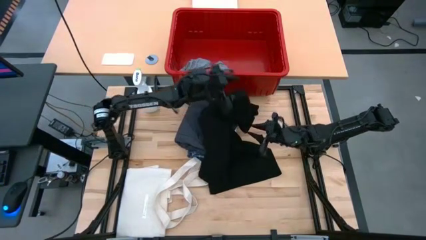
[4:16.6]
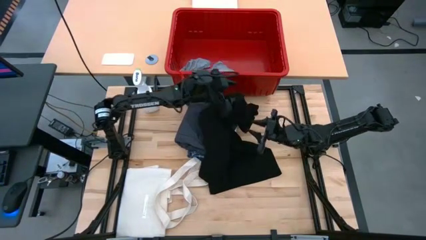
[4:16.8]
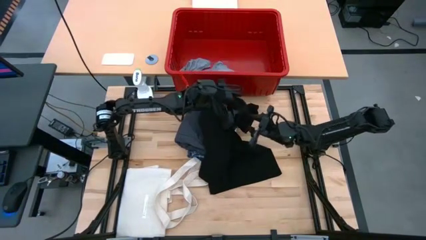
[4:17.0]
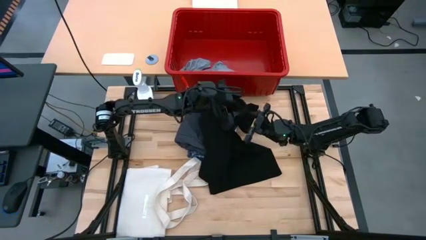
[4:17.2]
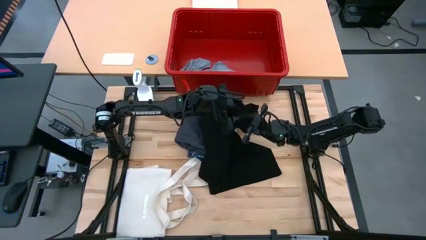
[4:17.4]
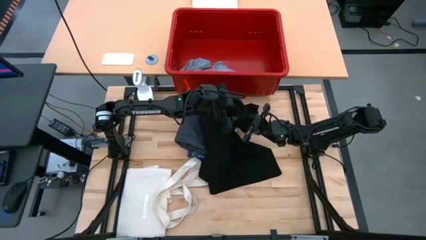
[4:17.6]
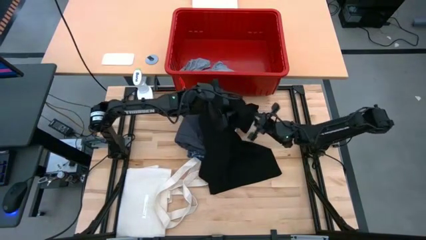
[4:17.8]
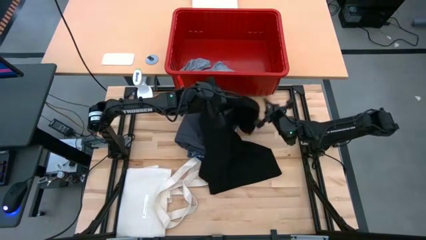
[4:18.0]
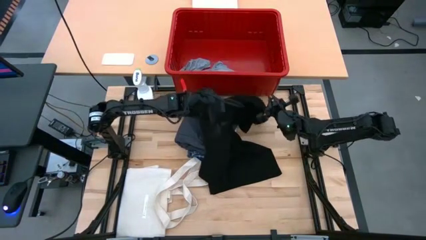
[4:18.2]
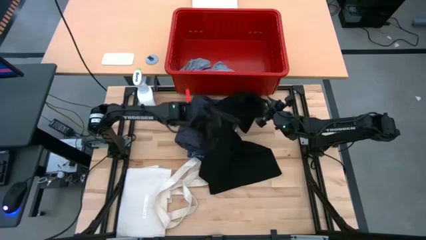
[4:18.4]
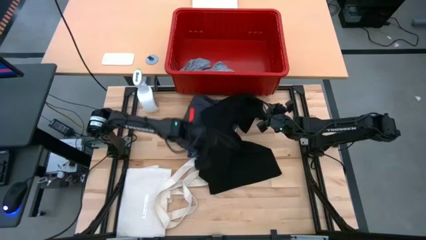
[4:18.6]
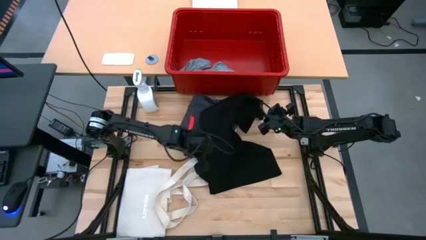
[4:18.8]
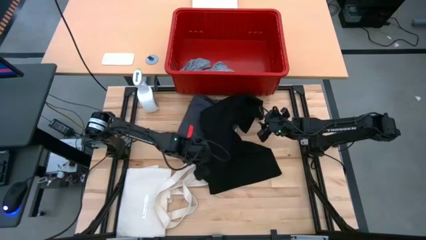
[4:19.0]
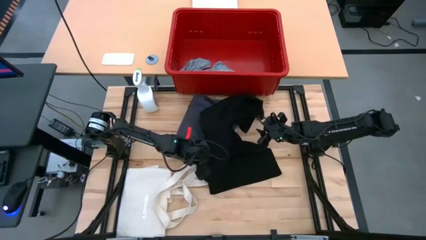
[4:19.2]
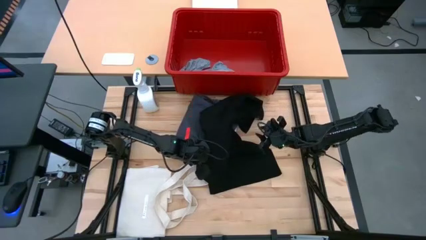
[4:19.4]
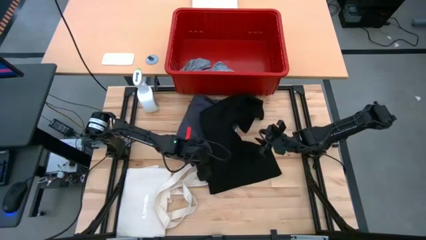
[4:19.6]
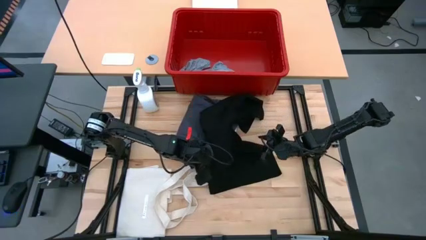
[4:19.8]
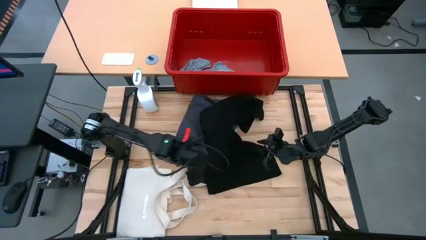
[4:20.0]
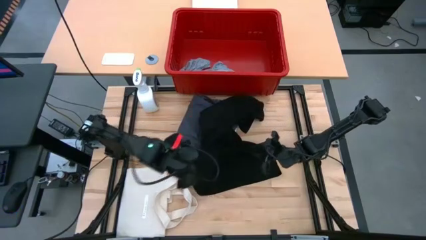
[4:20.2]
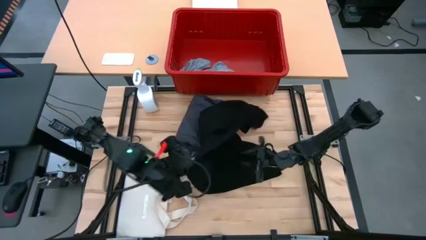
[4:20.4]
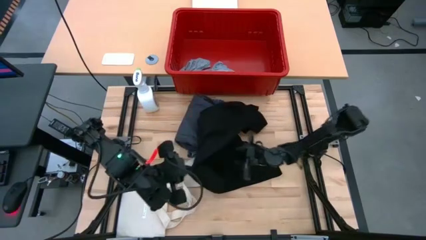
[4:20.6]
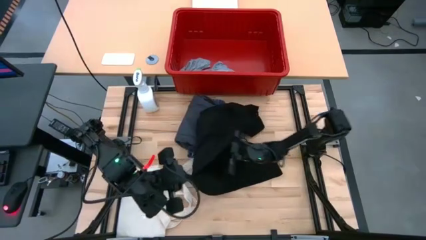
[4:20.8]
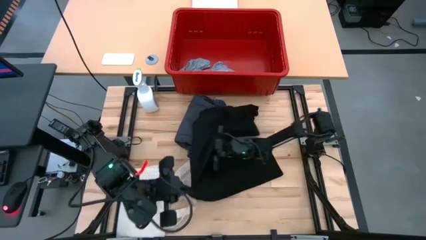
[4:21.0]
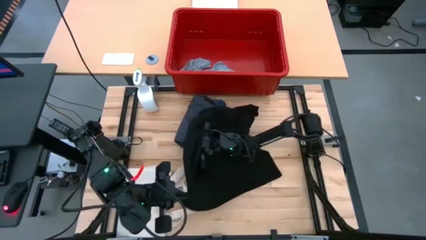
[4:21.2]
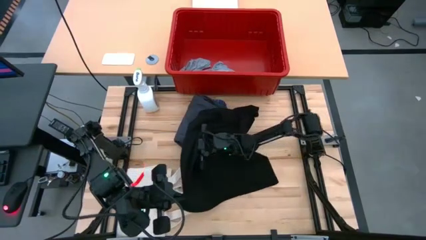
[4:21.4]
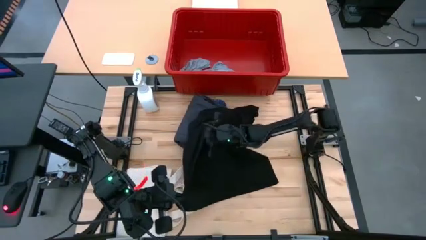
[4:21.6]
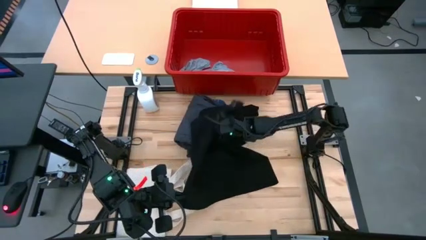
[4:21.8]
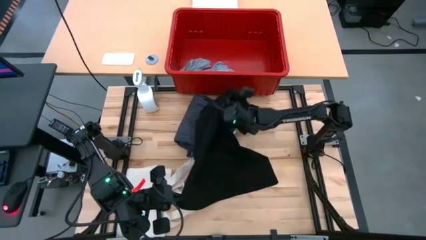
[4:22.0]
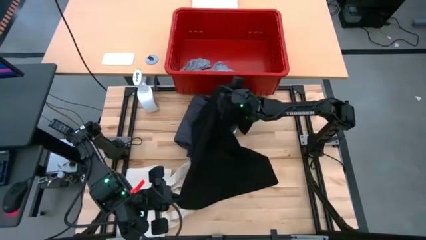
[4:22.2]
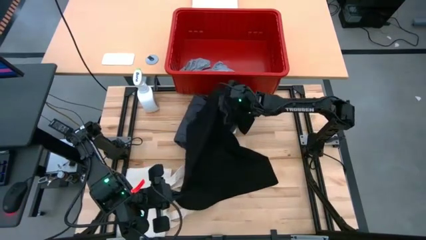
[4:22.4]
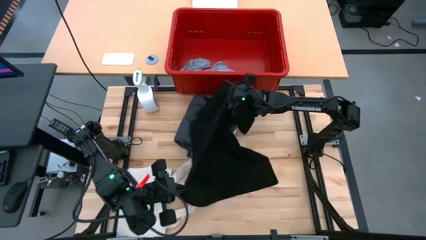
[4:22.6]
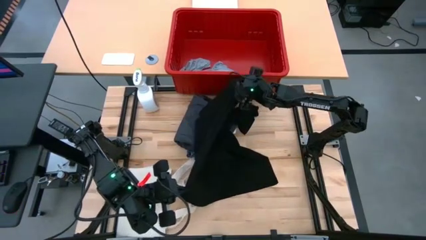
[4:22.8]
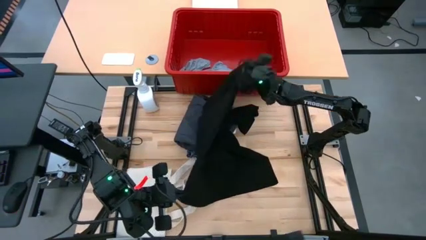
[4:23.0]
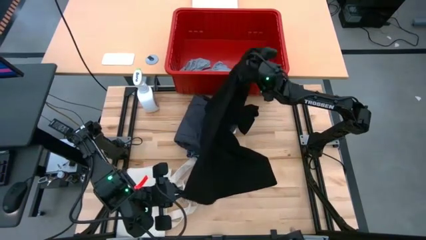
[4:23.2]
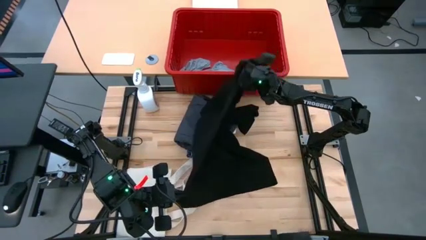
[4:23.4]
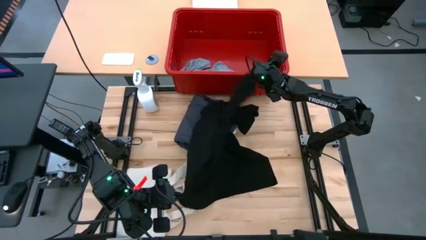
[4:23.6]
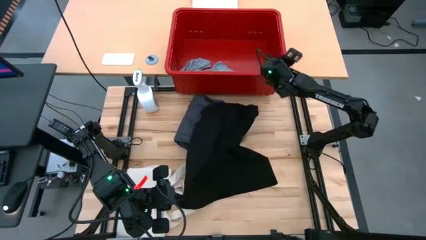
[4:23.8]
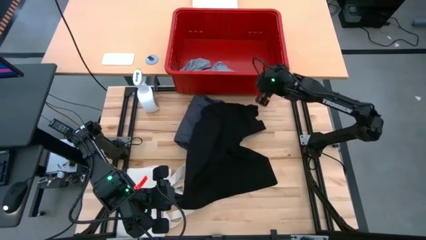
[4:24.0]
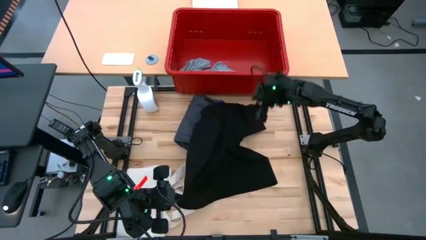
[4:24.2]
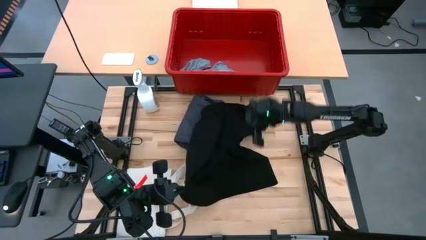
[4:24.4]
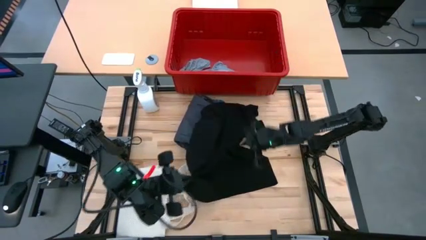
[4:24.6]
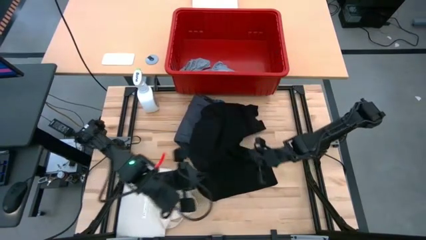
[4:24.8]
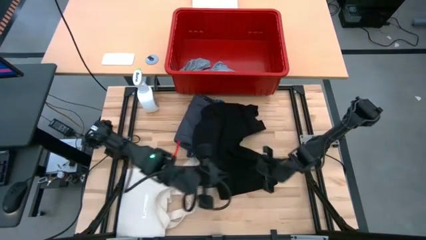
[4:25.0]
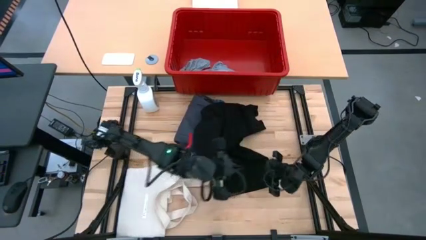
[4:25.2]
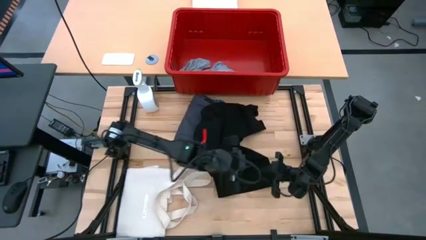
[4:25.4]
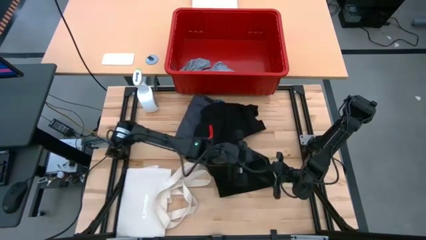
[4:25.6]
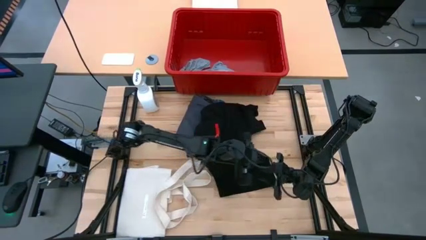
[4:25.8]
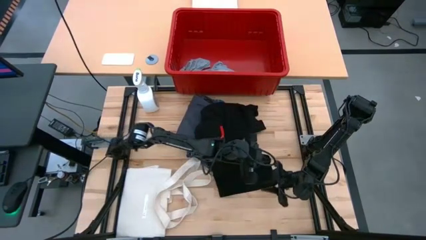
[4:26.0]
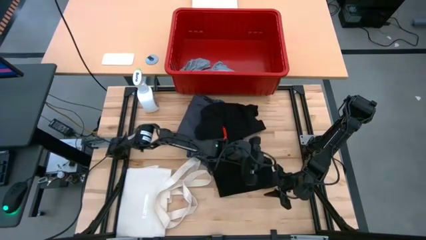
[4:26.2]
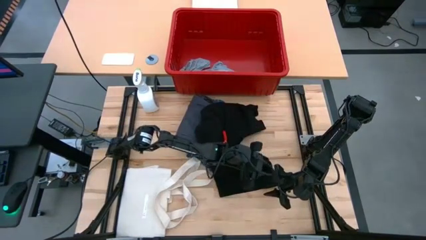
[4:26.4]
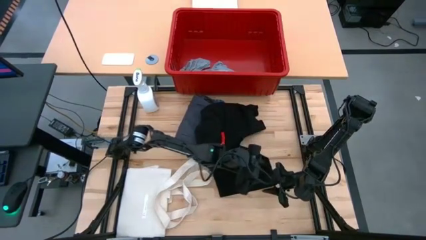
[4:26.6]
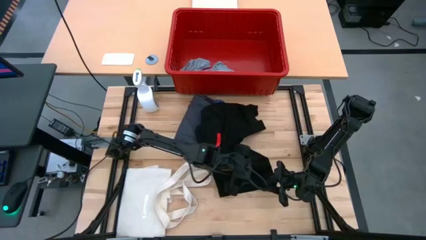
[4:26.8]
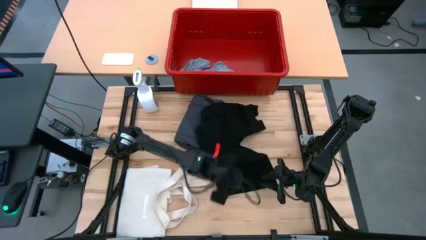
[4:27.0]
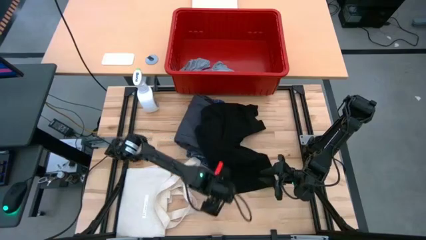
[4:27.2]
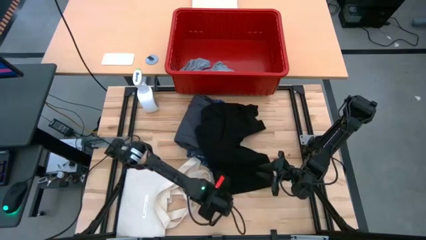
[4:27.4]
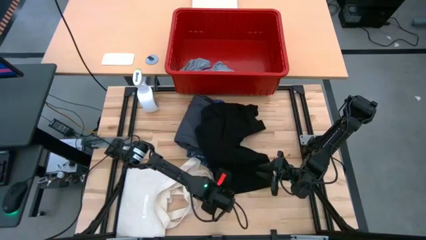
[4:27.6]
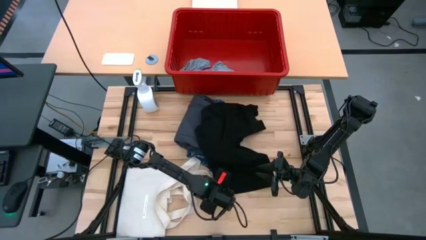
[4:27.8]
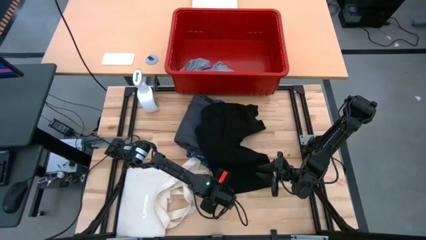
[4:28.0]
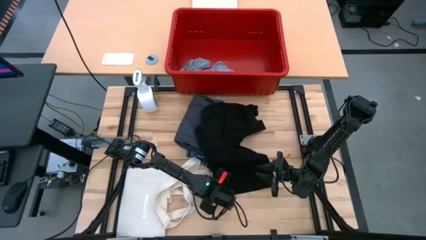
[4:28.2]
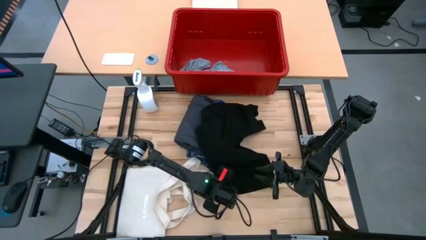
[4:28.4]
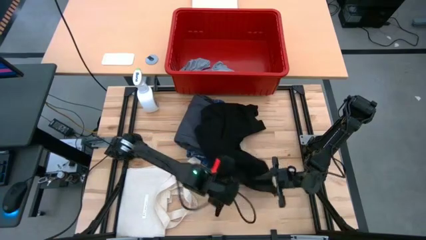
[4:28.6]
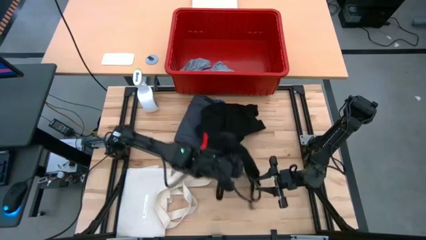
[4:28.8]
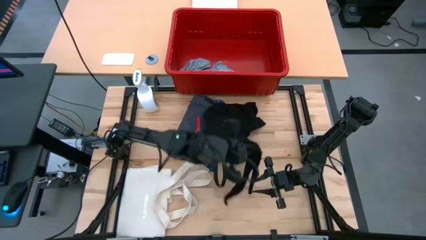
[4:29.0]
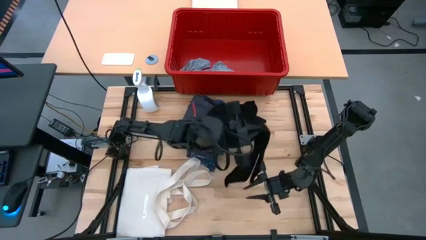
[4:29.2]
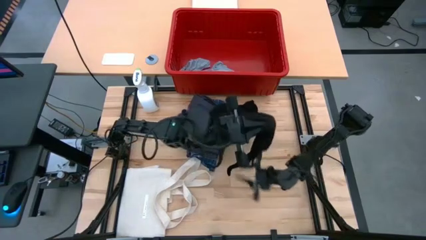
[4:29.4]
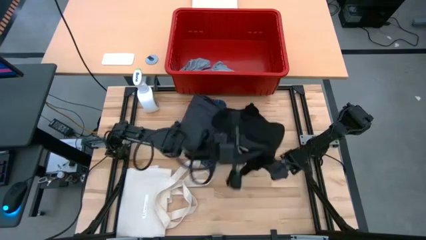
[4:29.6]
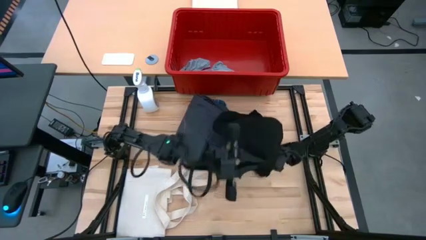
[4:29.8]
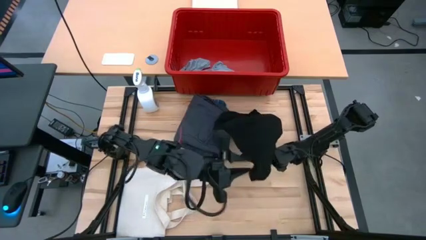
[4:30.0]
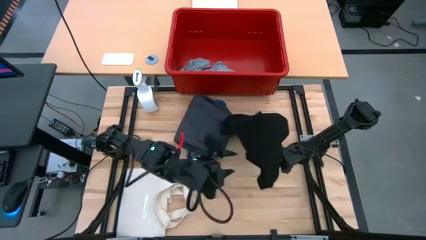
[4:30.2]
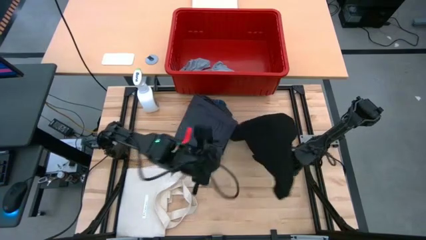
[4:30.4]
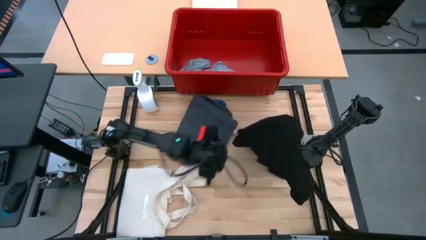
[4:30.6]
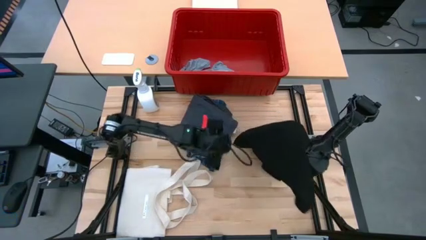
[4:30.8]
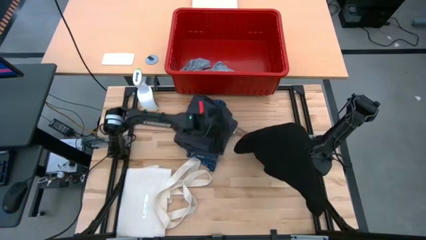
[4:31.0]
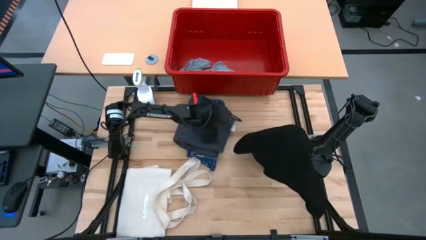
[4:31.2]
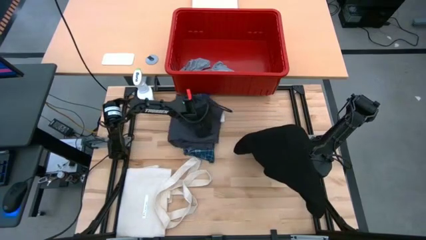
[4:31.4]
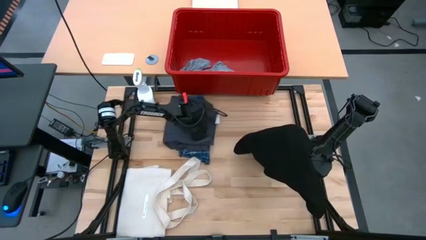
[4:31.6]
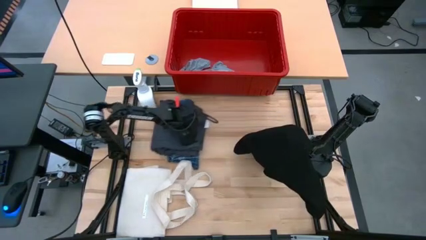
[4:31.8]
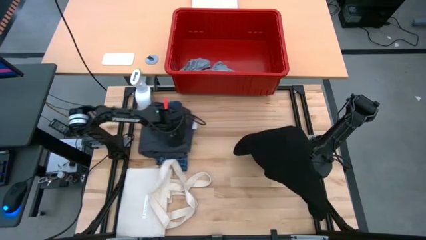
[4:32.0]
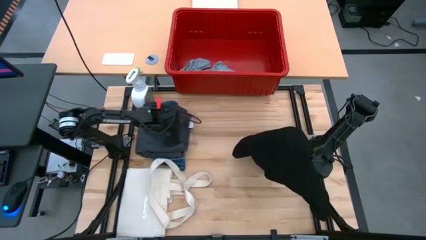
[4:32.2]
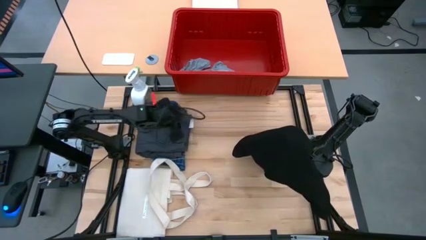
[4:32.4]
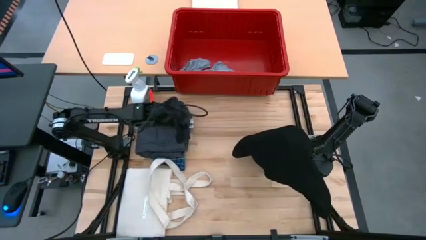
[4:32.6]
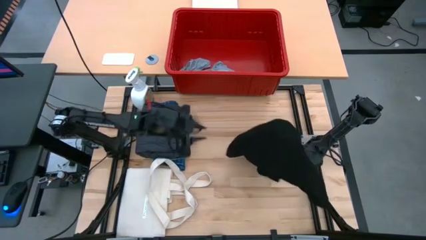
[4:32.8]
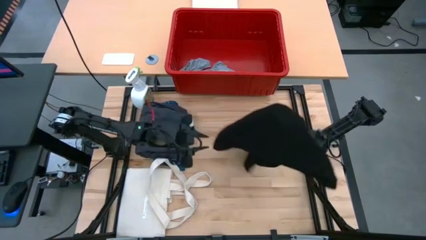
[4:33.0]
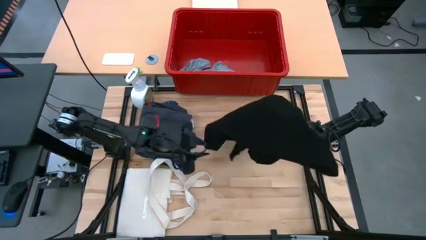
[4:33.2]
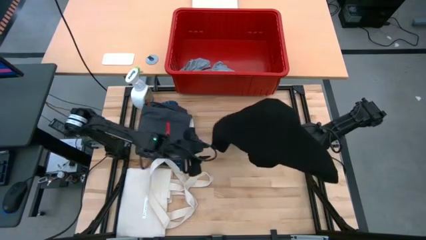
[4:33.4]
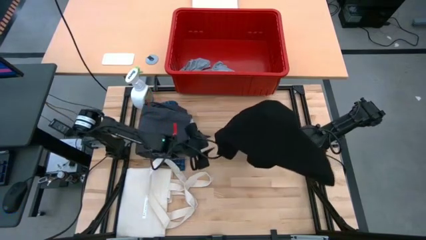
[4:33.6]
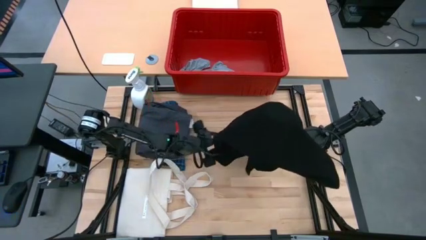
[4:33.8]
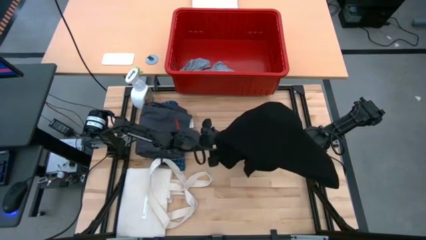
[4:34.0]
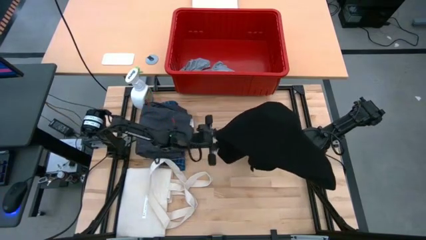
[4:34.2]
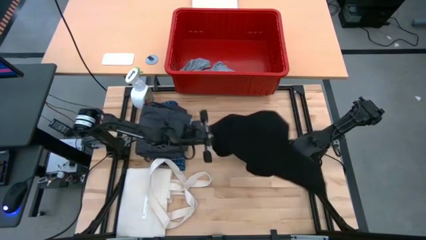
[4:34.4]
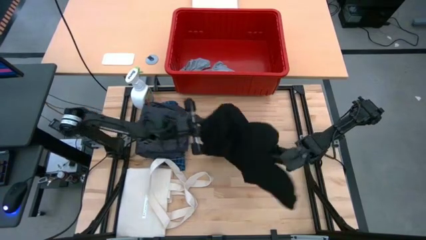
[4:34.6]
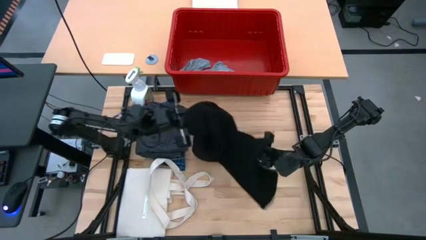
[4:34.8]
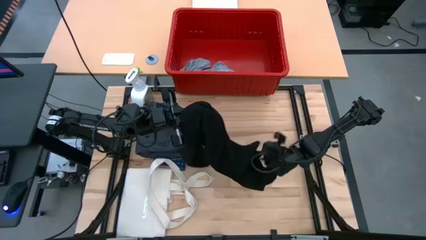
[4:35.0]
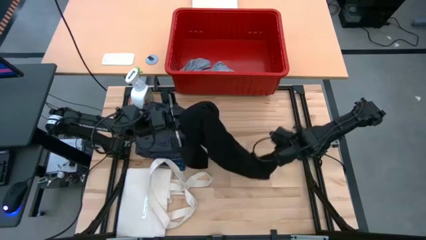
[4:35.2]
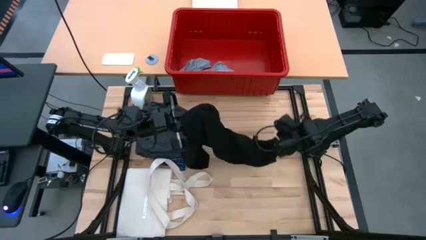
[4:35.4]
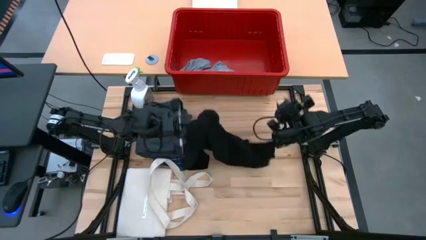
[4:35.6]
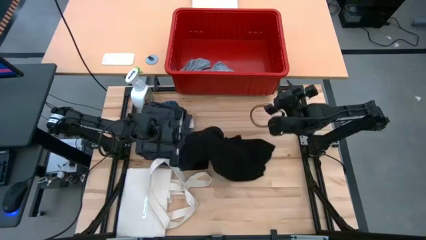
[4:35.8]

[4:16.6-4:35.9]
Task: Fold Laundry from Bin
Fold the black shirt
